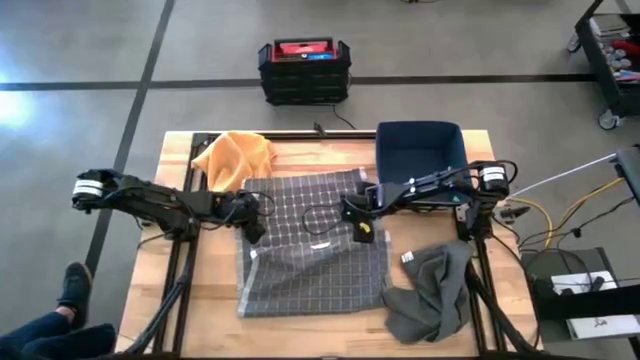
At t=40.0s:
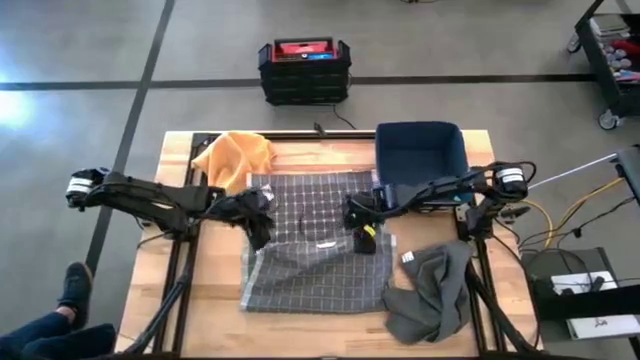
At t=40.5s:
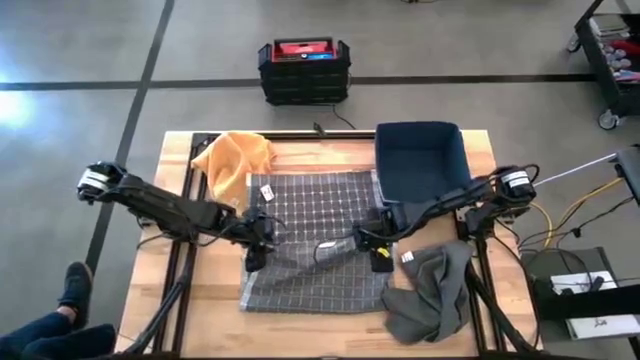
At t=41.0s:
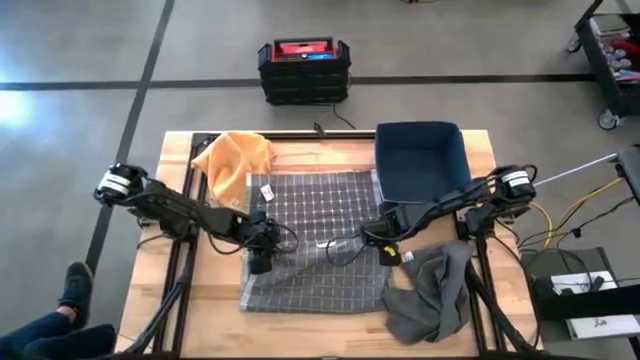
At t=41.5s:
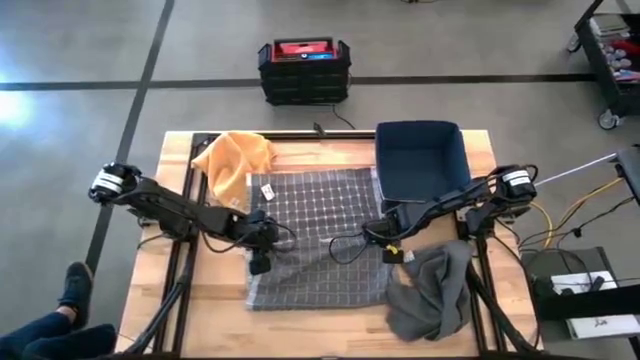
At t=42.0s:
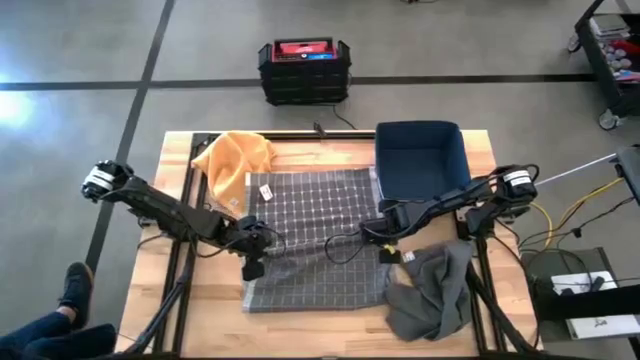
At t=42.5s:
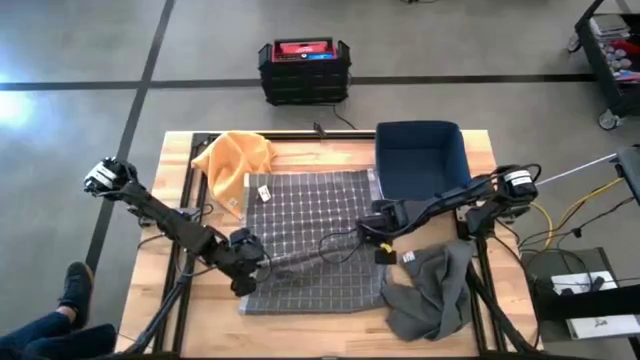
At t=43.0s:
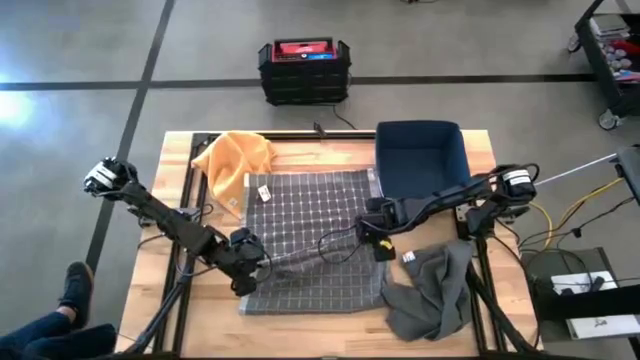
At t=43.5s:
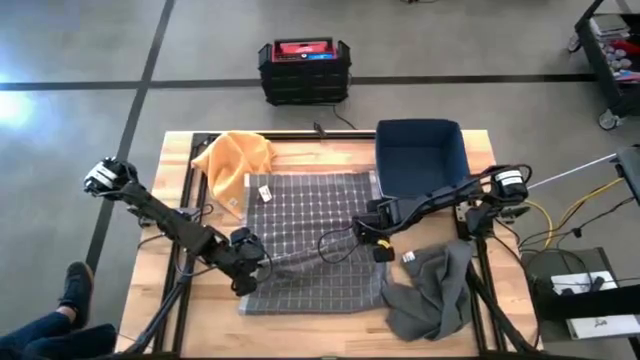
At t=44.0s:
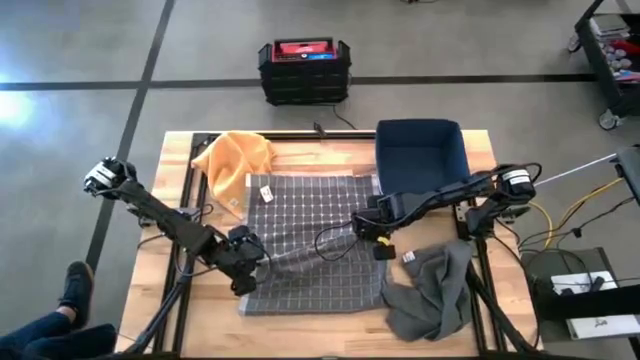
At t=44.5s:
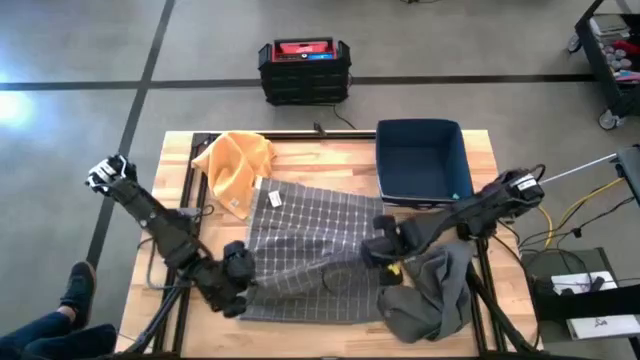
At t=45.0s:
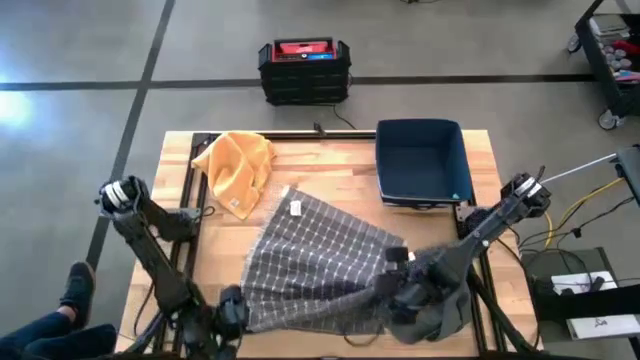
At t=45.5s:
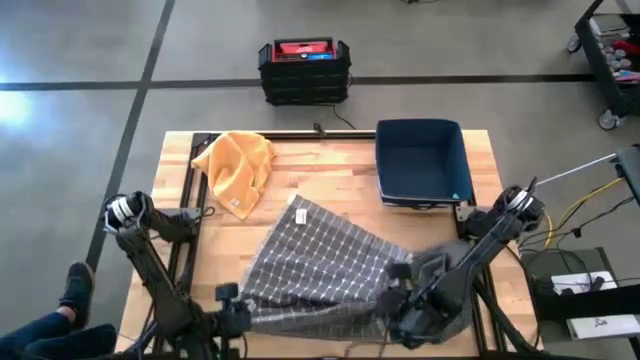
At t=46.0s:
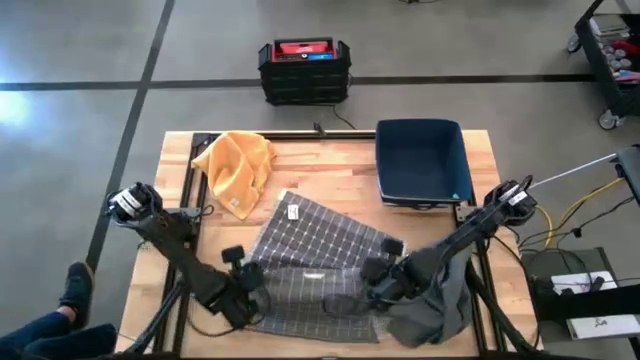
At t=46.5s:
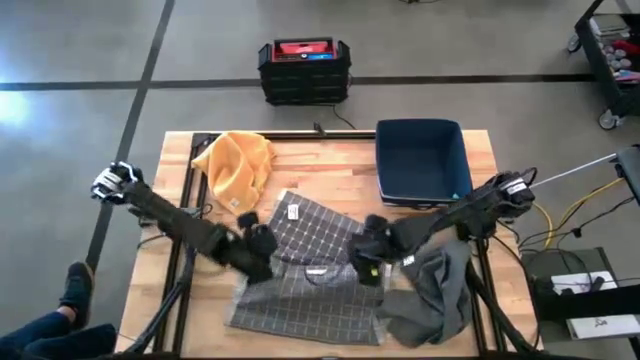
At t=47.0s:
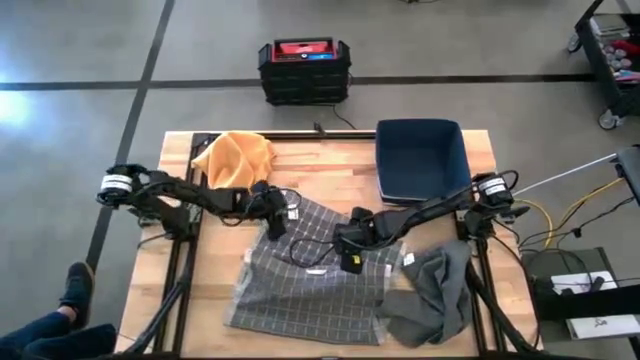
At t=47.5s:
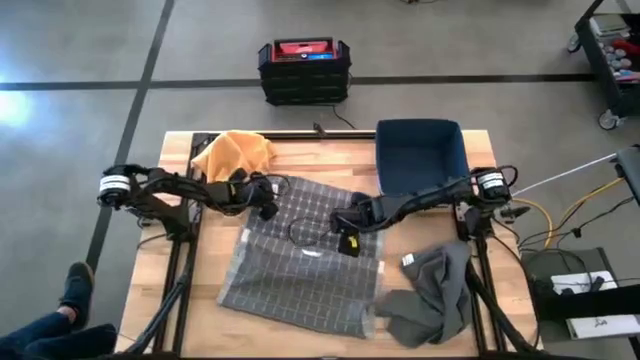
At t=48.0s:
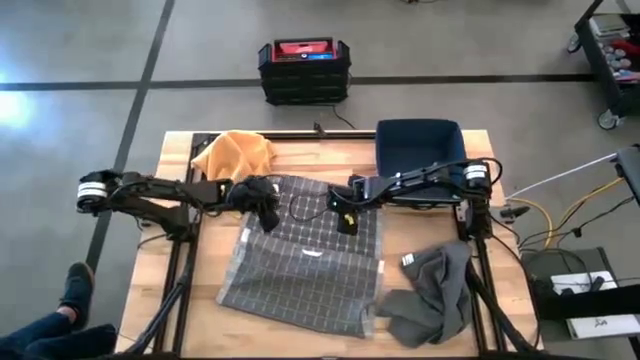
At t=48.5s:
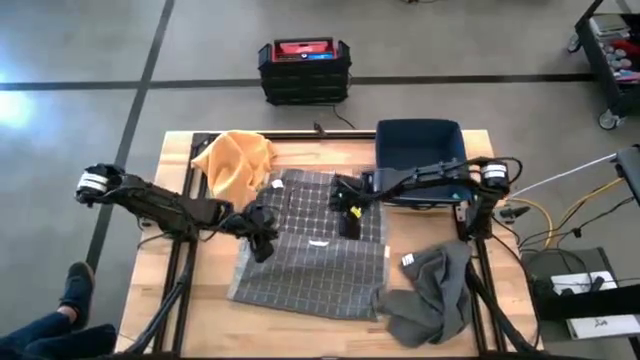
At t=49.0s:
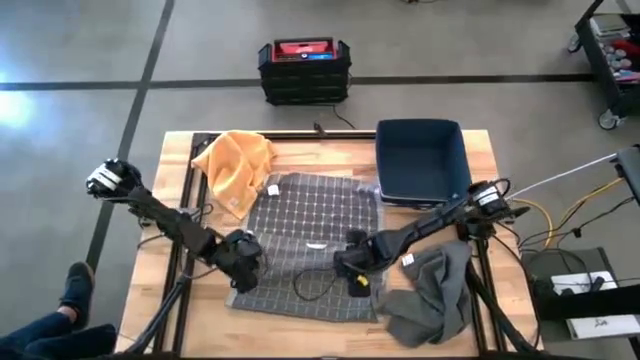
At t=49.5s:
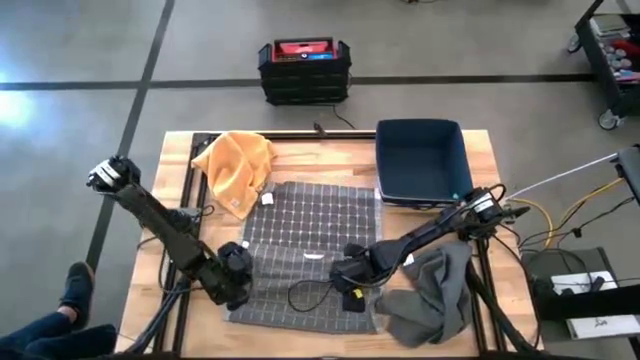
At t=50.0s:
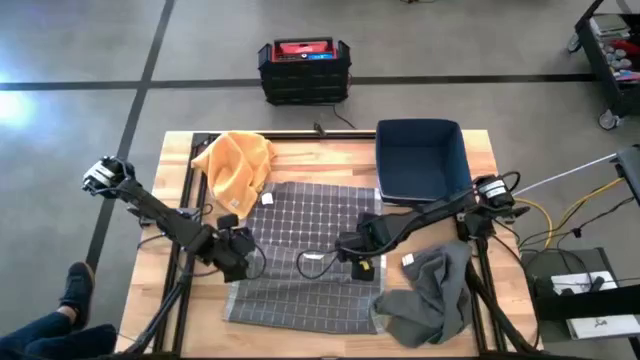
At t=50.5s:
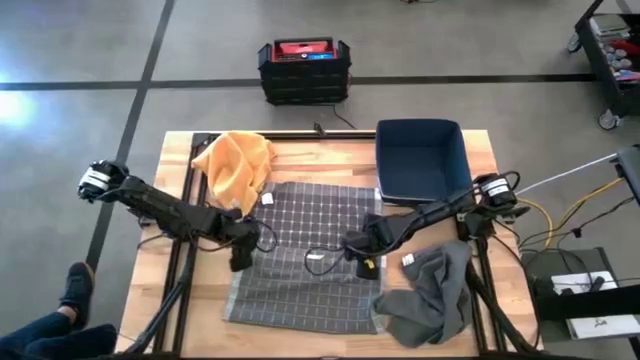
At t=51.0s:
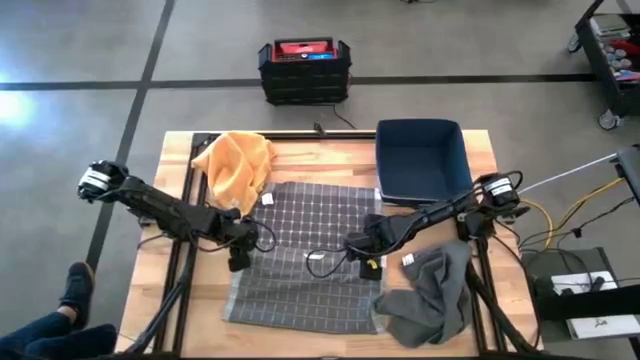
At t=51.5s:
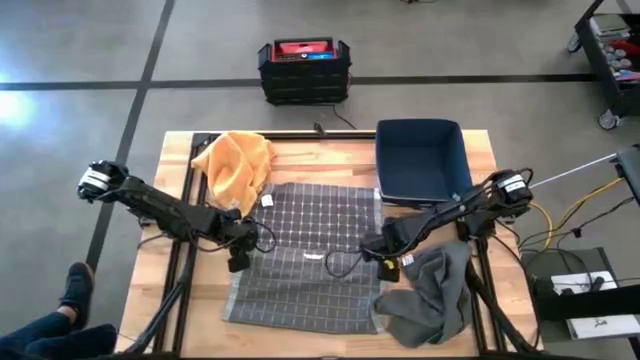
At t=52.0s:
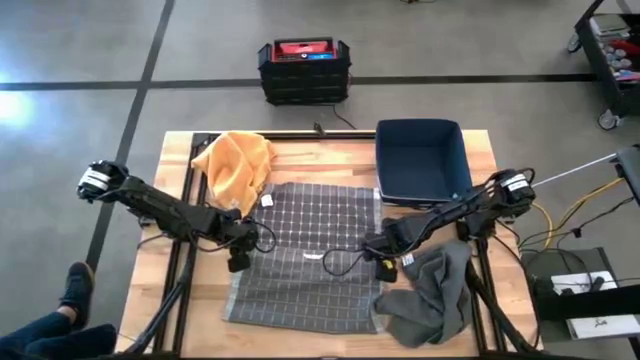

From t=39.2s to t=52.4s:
Task: Fold towel
Fold the gray patterned kitchen towel

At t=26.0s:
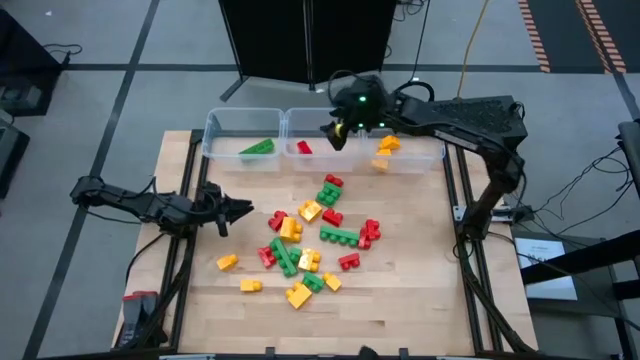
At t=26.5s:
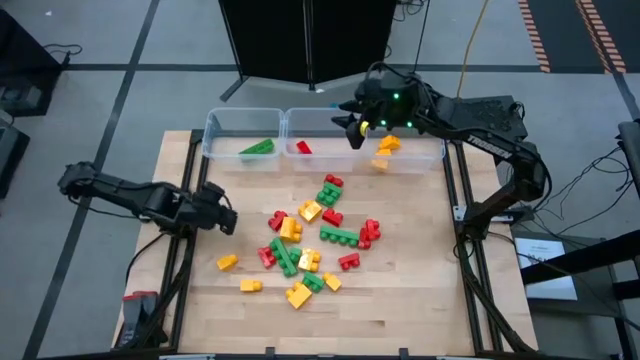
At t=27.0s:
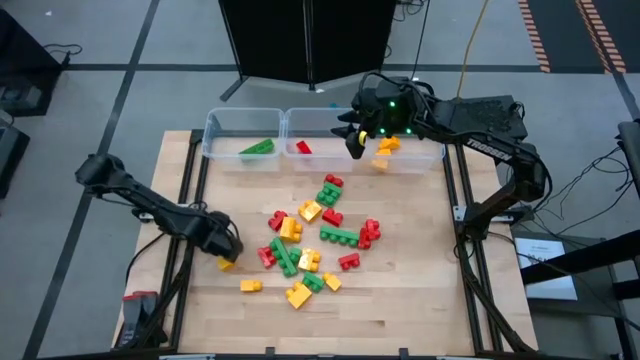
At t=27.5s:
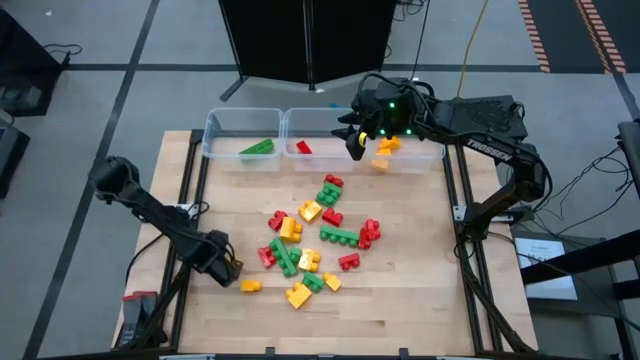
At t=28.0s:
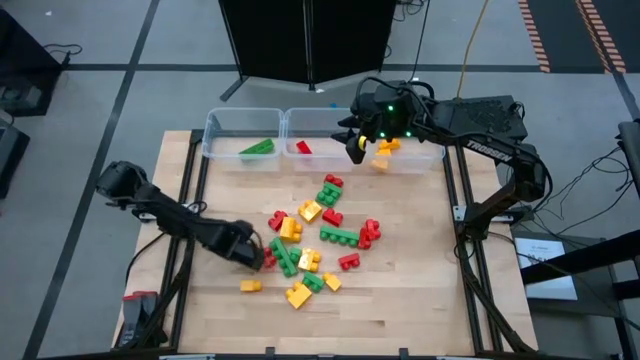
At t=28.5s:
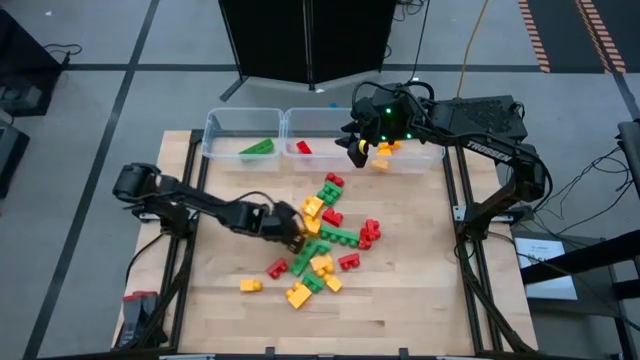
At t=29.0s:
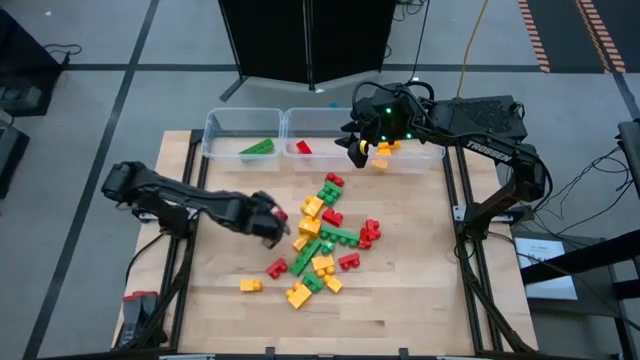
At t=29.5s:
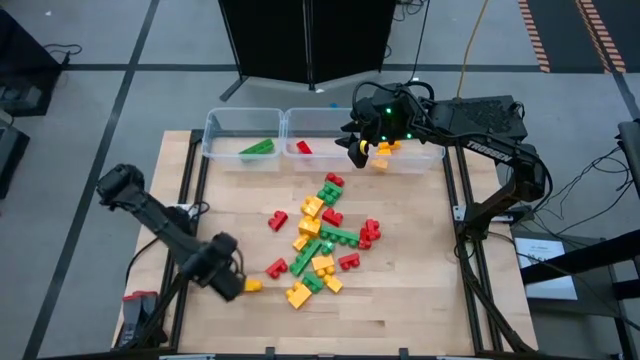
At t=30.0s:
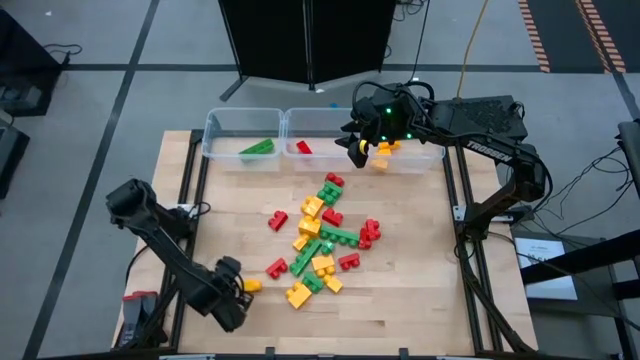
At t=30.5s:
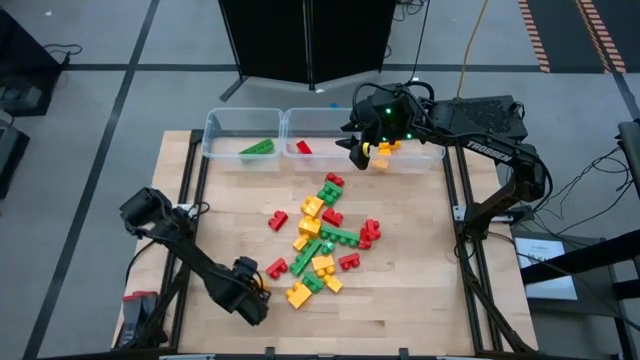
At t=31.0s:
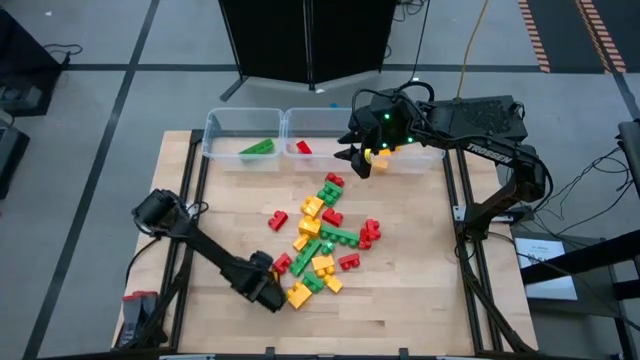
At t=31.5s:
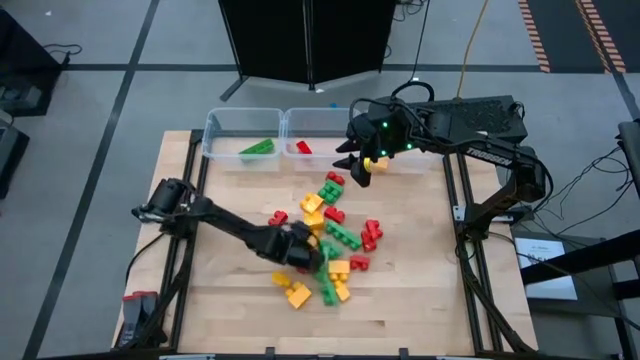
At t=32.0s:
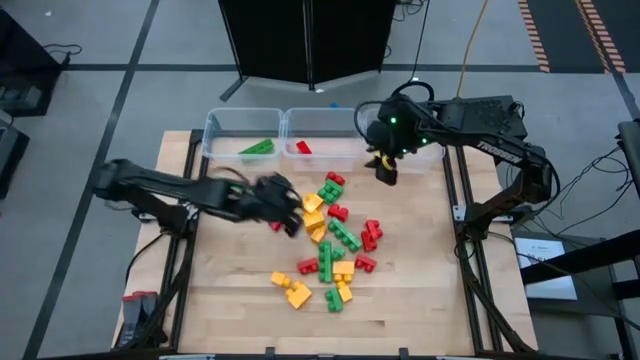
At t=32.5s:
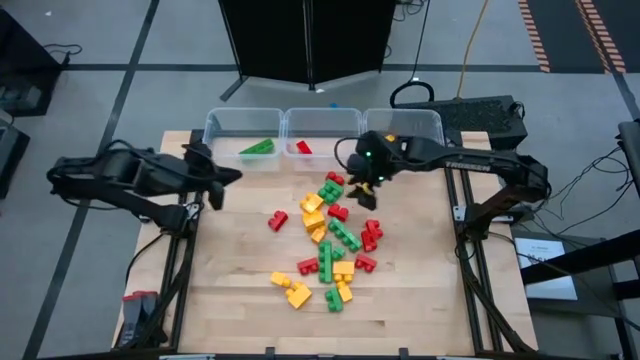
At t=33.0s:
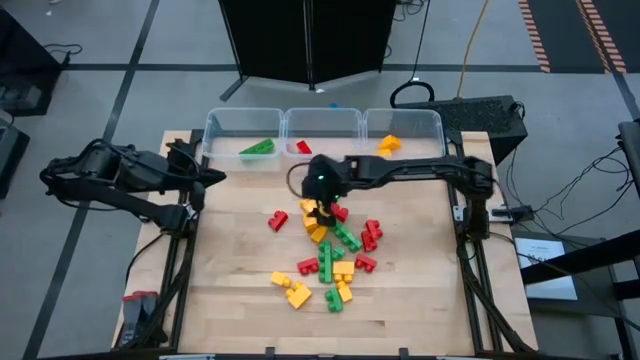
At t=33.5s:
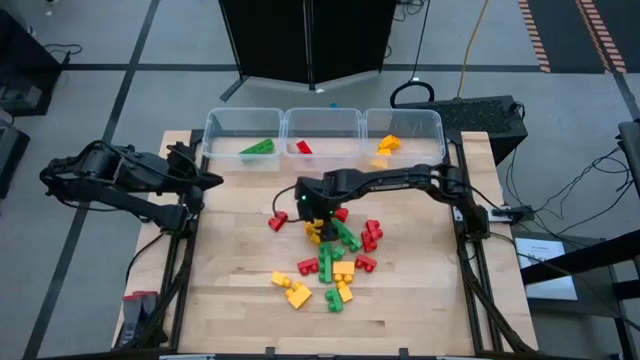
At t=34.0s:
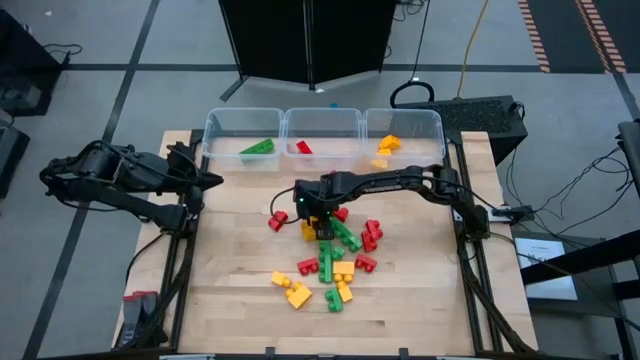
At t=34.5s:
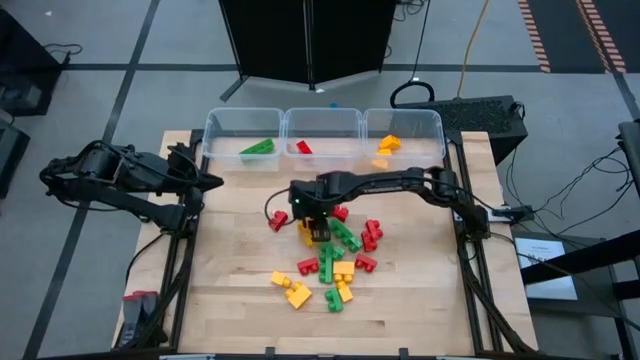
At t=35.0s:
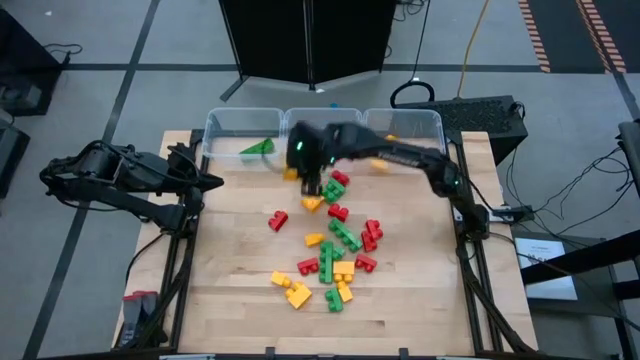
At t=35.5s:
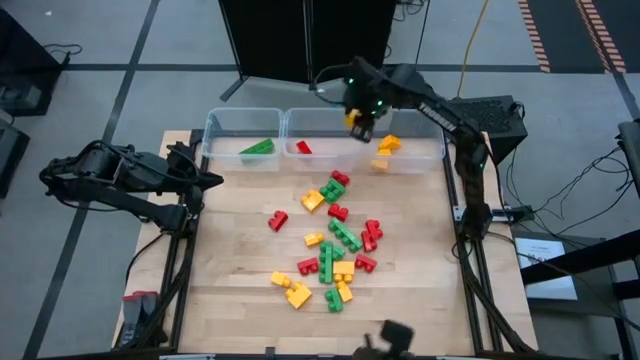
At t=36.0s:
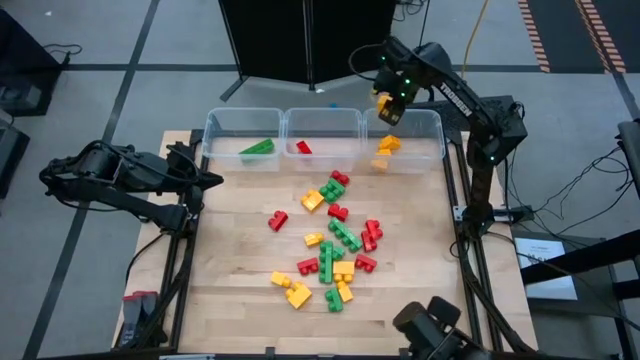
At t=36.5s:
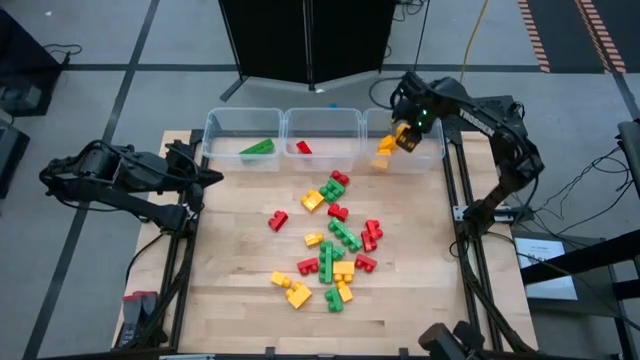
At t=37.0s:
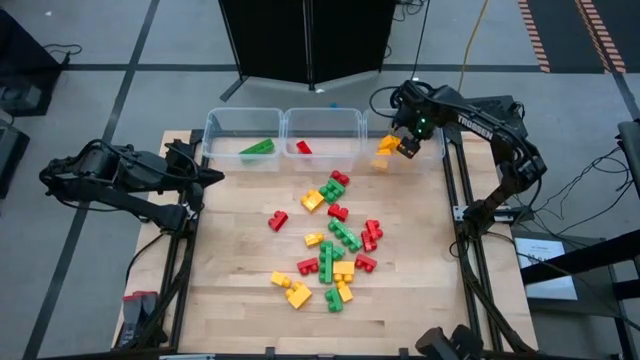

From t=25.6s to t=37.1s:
Task: Sort blocks
Put the yellow game piece with 2 studs into the right transparent bin
